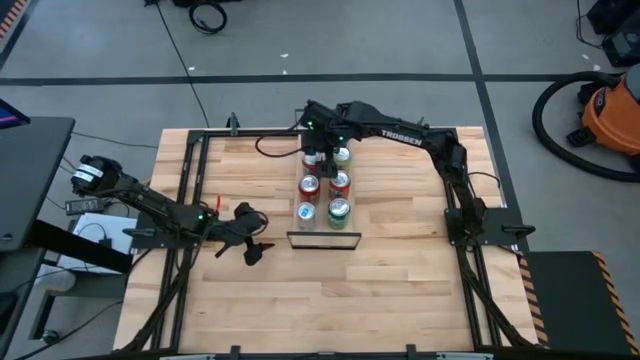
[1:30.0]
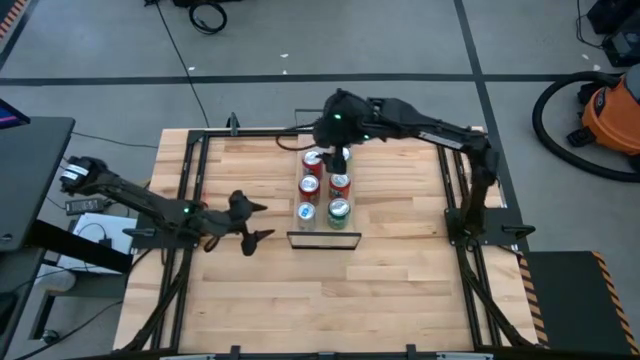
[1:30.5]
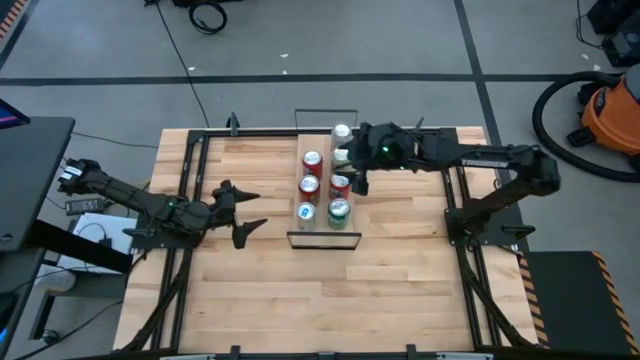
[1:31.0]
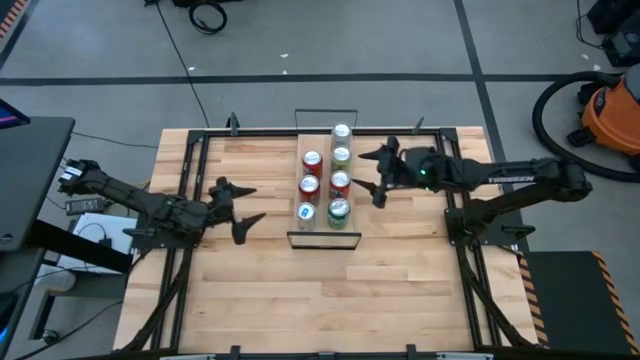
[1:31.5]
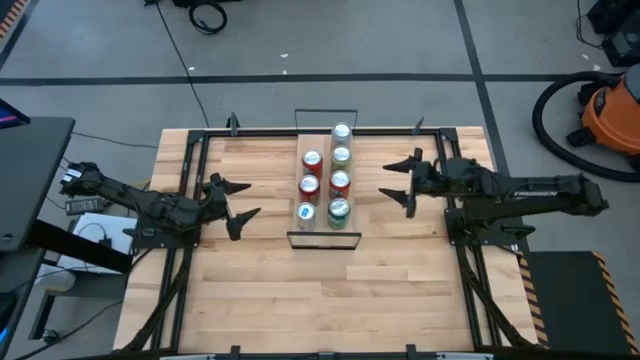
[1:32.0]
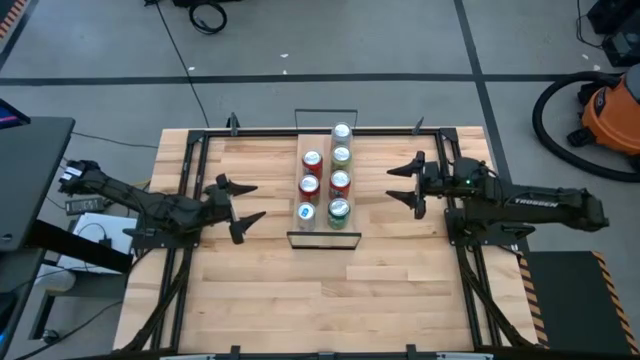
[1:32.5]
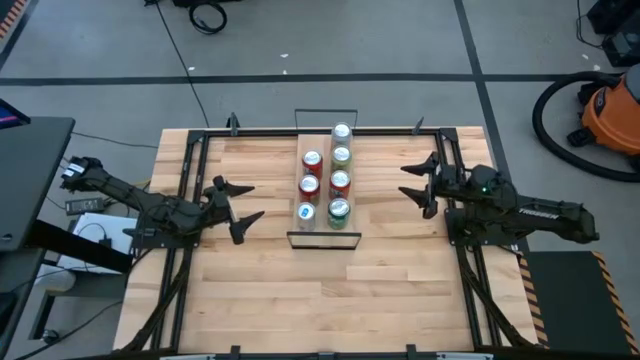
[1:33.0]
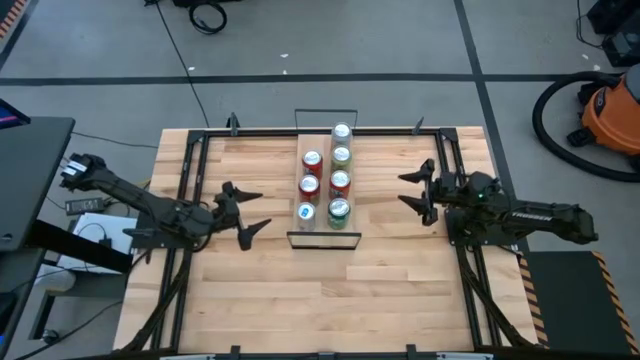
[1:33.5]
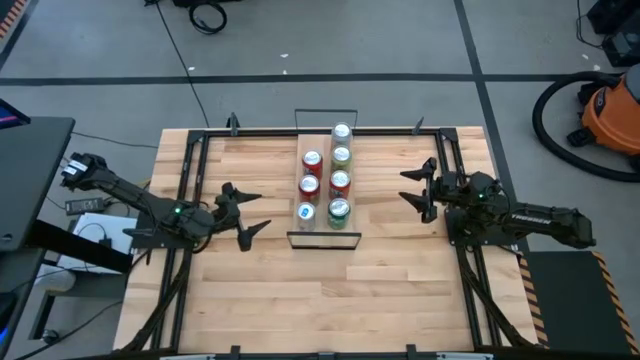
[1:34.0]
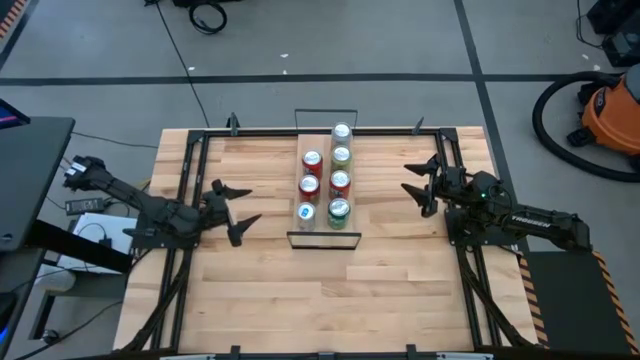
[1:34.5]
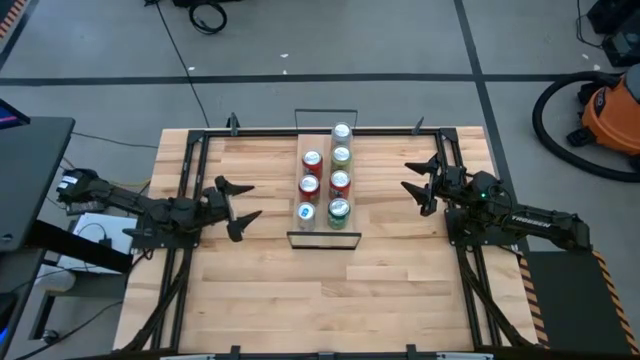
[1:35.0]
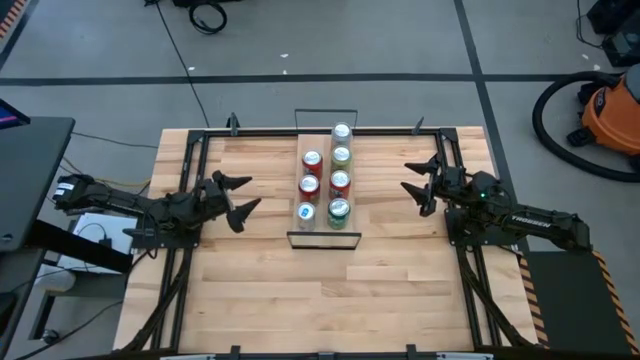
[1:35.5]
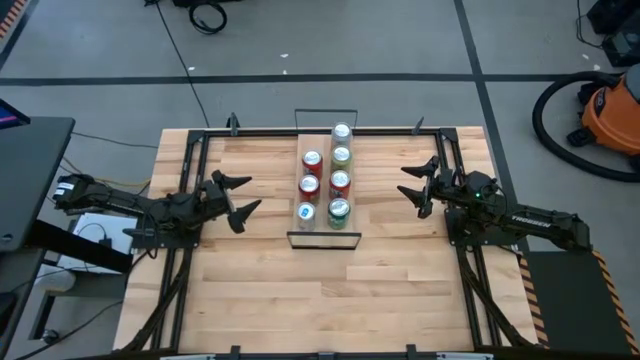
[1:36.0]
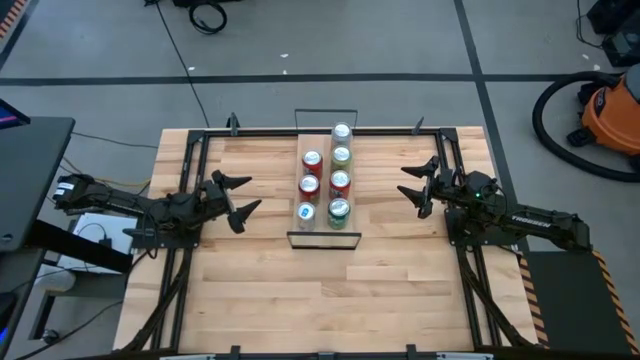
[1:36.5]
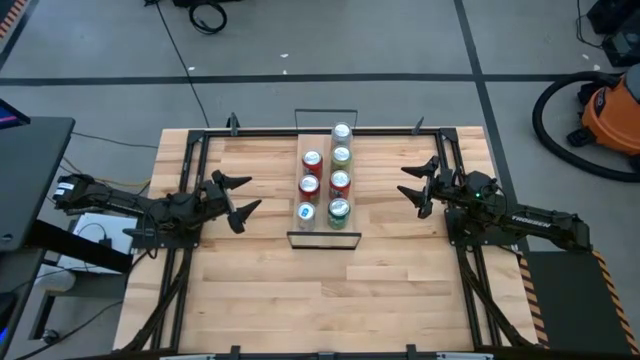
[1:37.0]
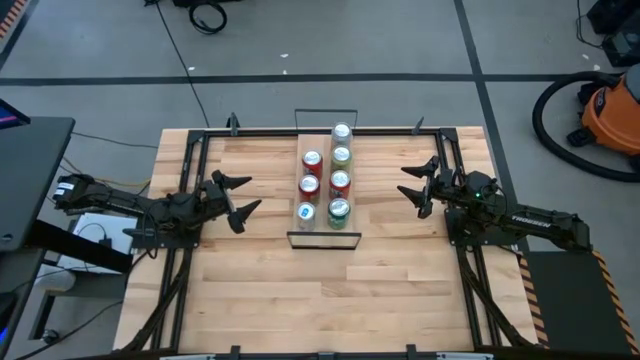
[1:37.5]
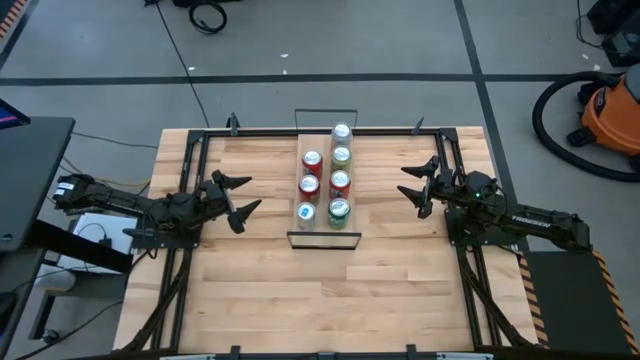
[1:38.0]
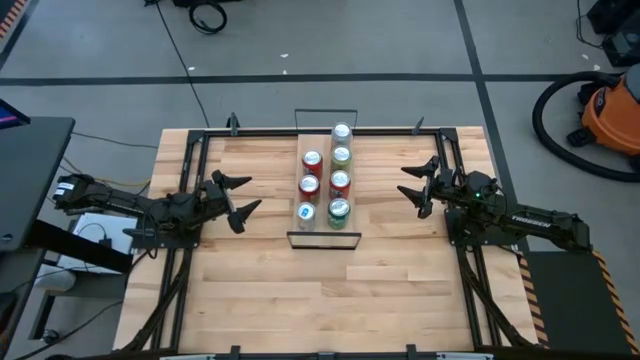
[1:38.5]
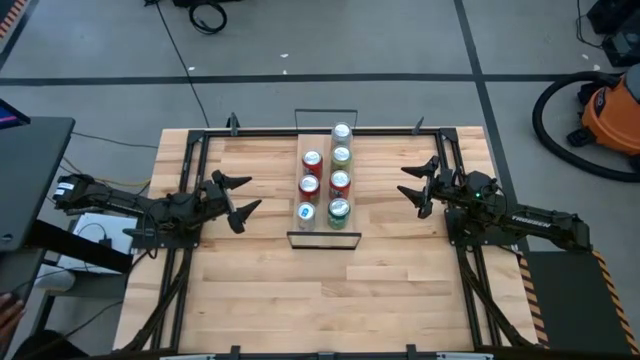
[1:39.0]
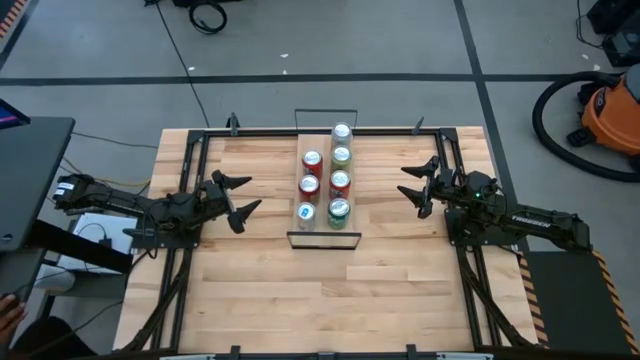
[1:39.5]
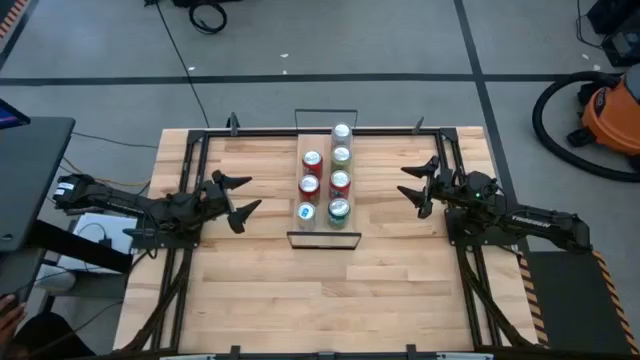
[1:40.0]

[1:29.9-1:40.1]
Task: Place canned beverage on shelf
Return to Home Position

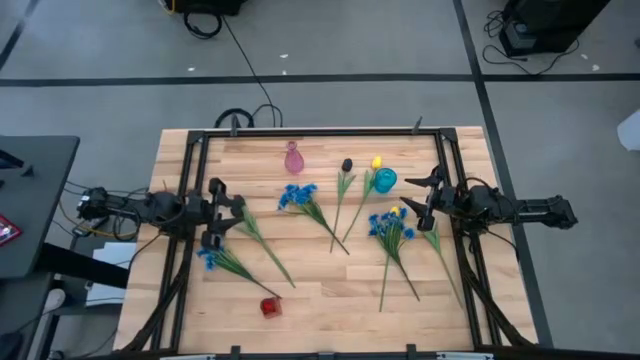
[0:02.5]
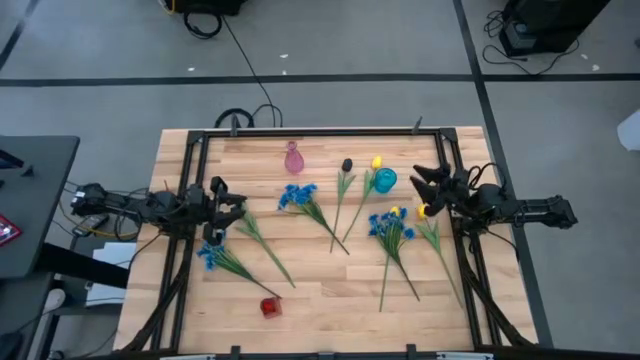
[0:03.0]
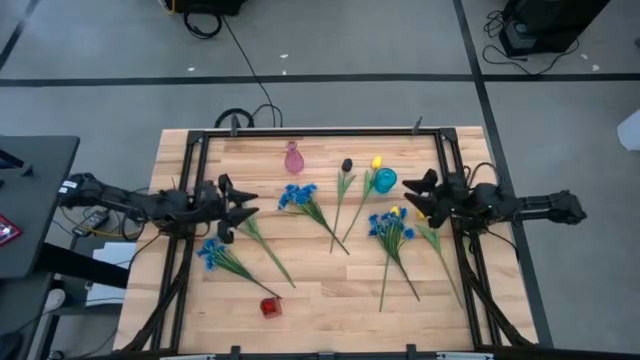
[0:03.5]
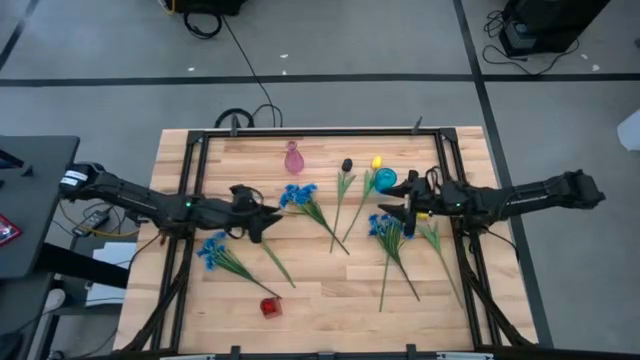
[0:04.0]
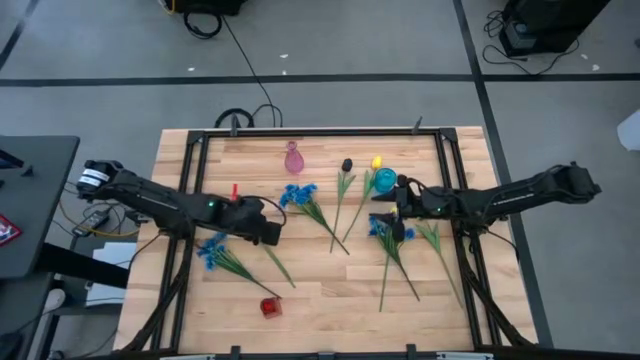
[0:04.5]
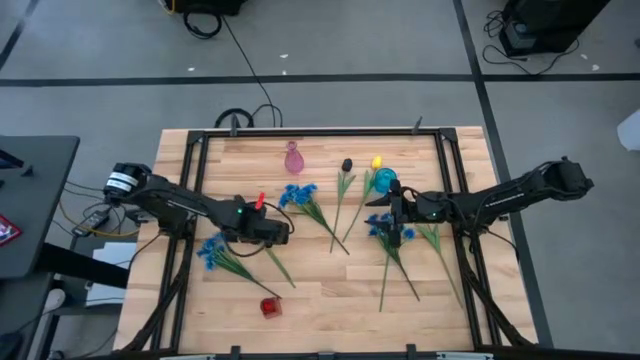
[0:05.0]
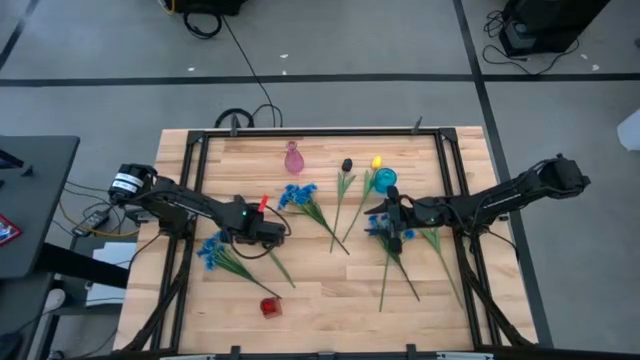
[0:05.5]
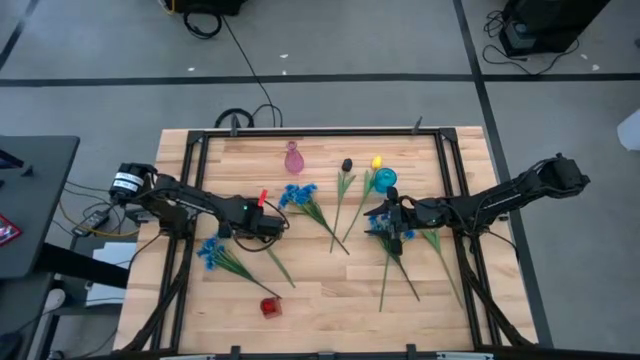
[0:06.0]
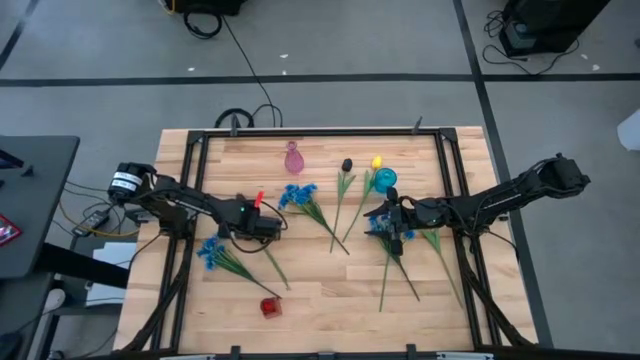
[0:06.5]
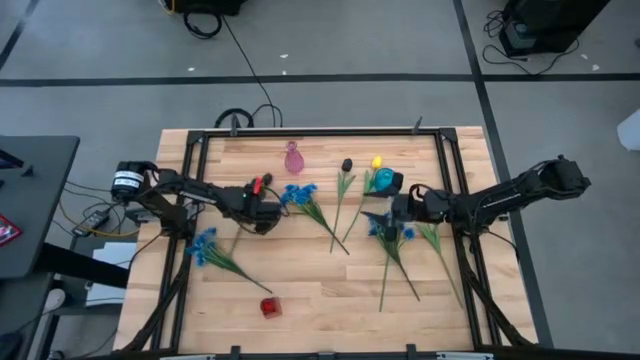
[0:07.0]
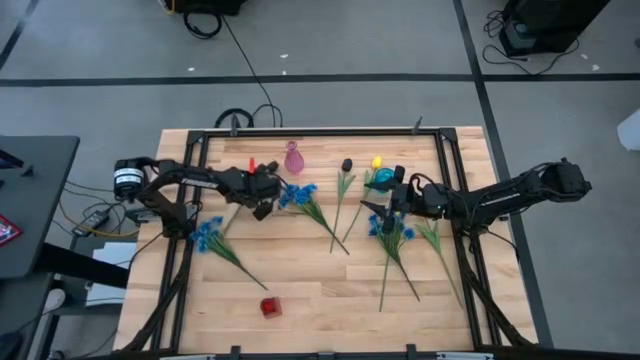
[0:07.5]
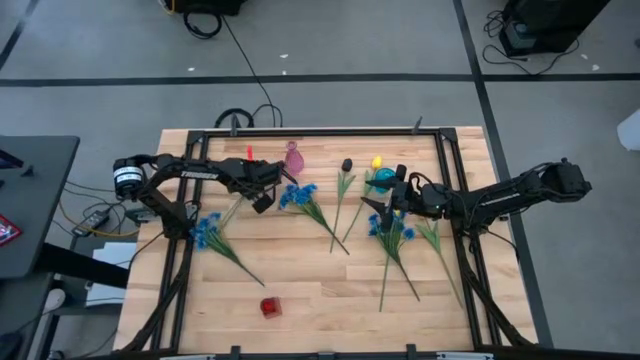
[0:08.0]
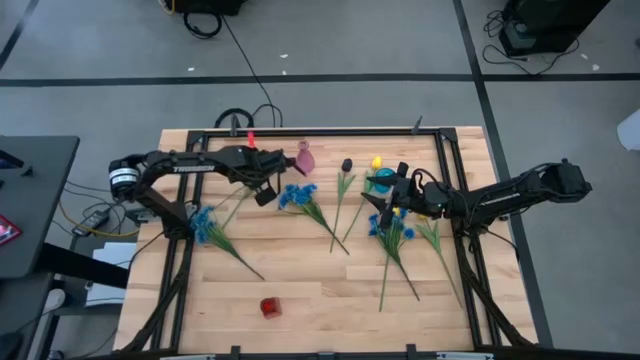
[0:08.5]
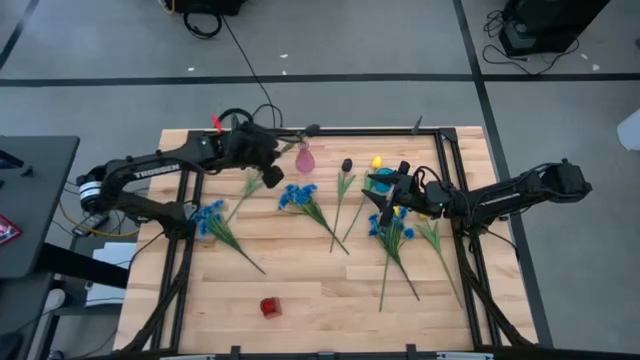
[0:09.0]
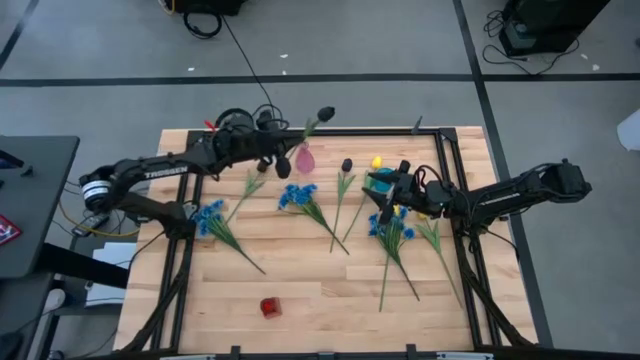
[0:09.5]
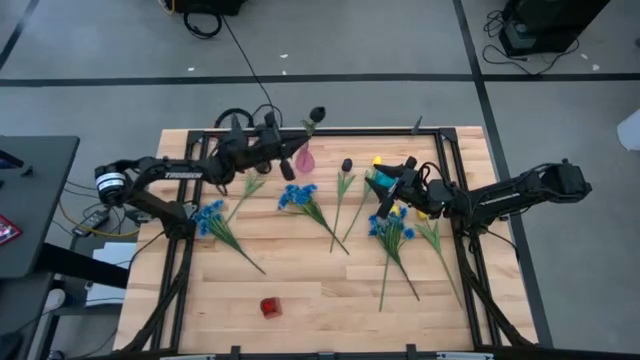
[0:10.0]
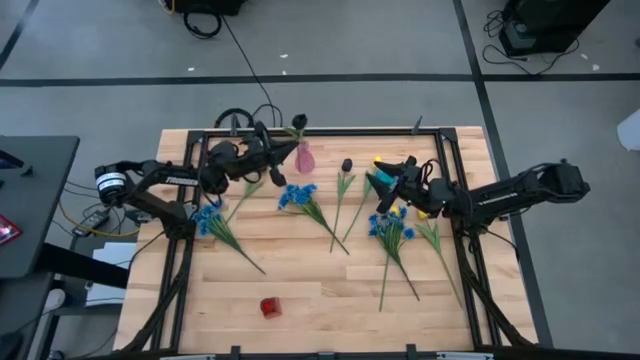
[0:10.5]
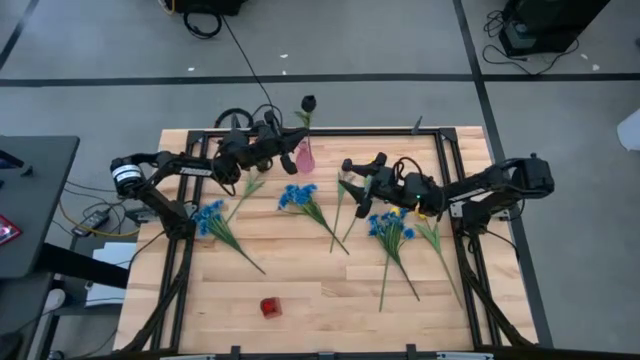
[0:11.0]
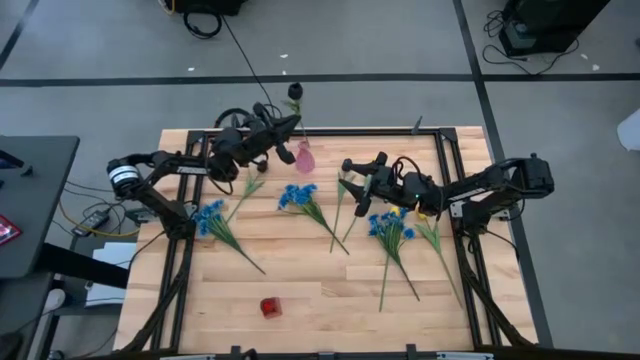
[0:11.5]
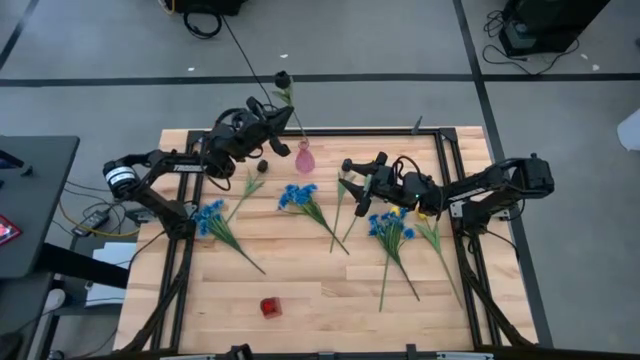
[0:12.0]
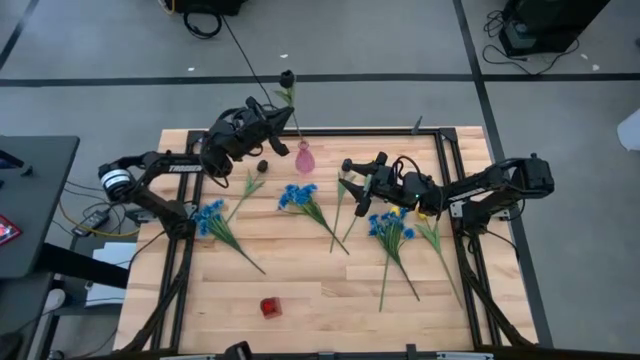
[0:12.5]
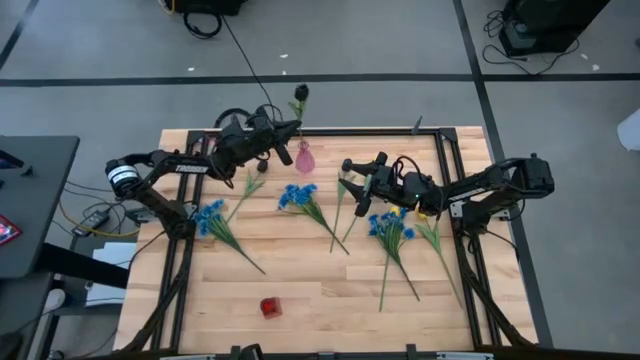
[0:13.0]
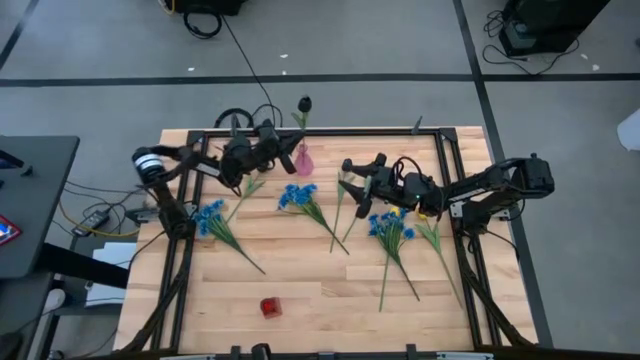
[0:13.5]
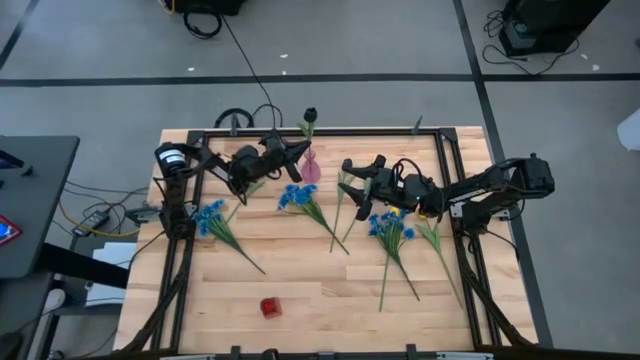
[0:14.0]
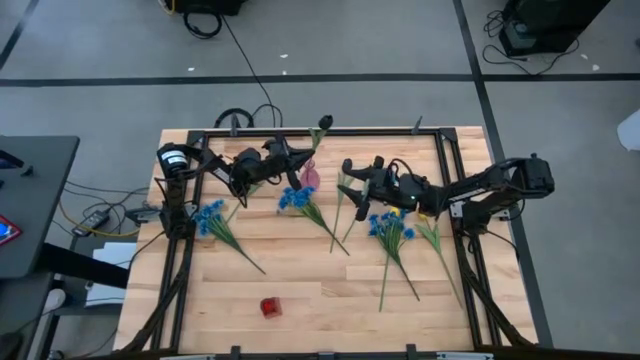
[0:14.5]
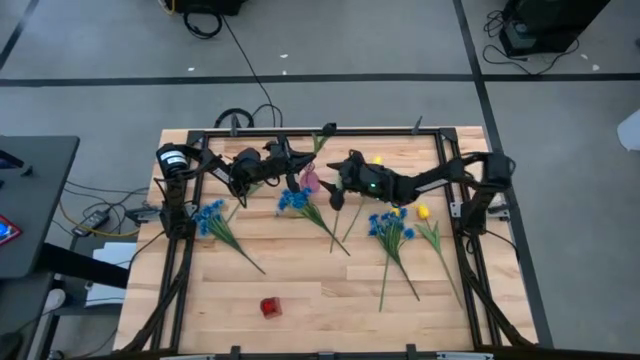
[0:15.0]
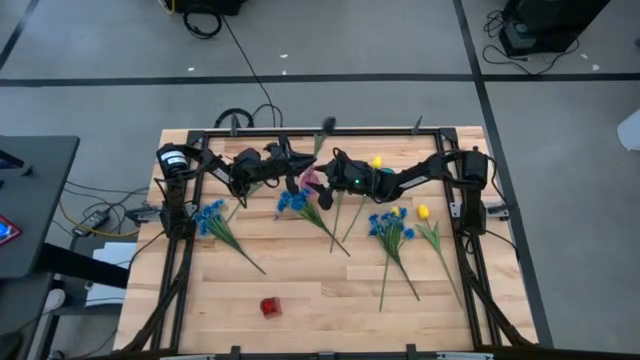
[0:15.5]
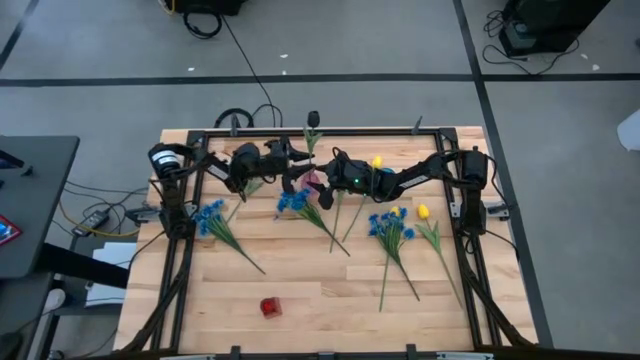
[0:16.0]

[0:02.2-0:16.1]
Task: Sort flowers into vase by color
Put the black tulip into the purple vase
